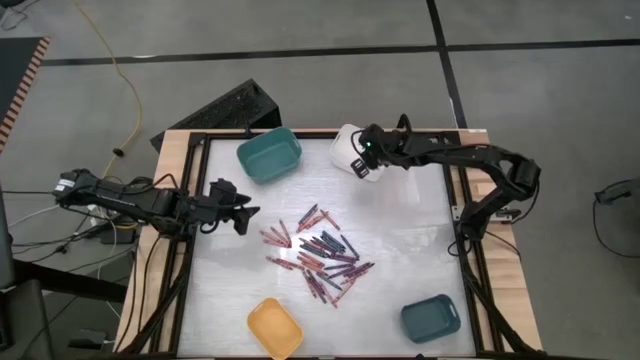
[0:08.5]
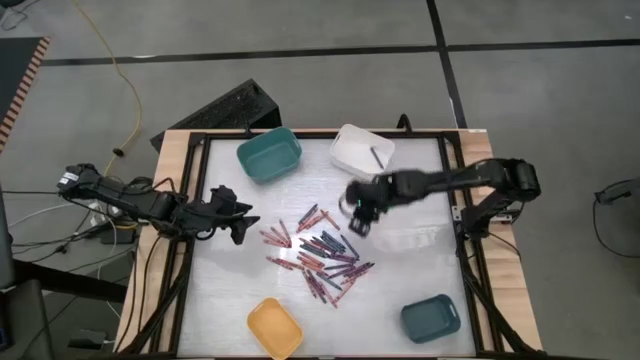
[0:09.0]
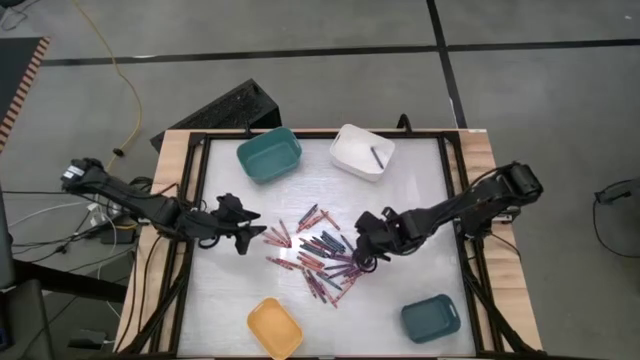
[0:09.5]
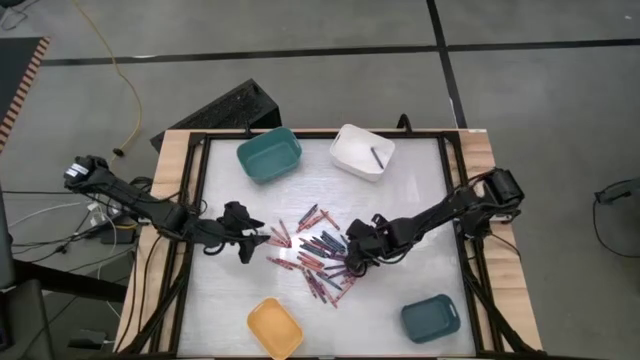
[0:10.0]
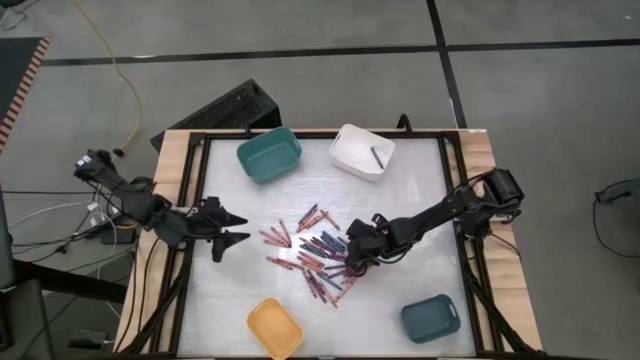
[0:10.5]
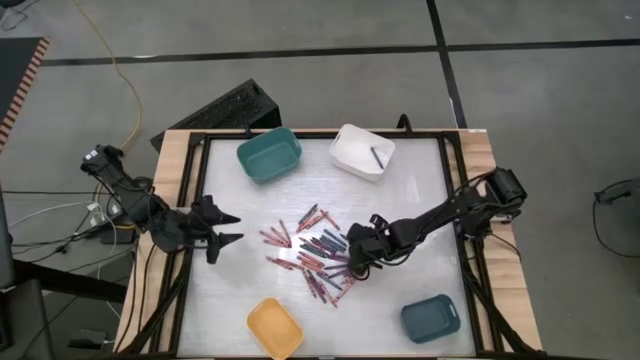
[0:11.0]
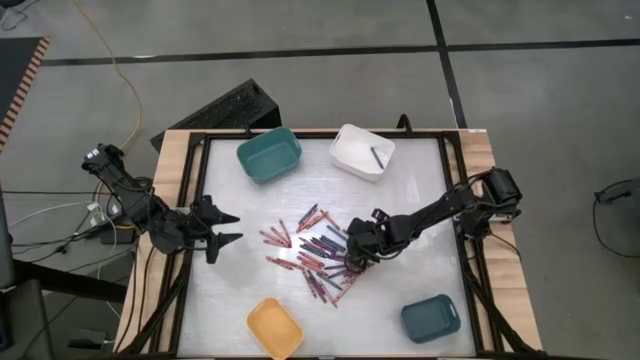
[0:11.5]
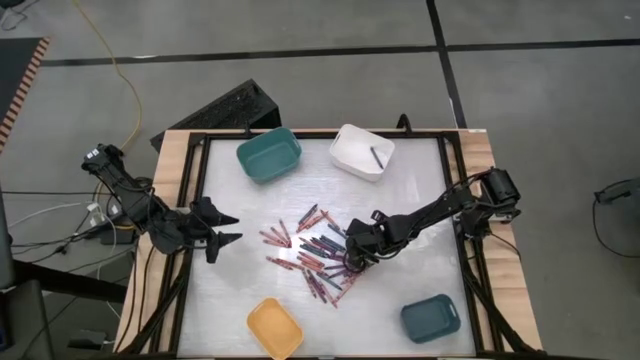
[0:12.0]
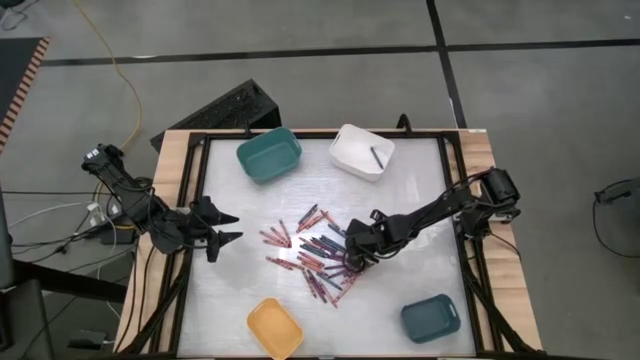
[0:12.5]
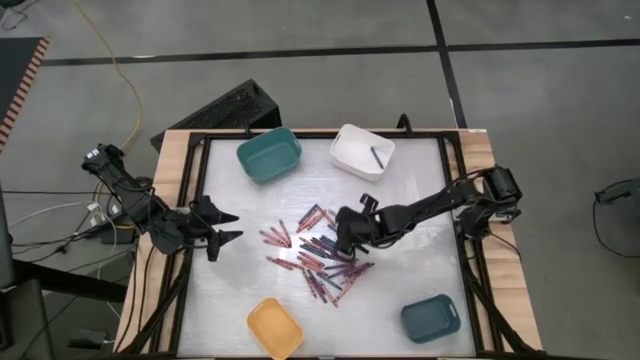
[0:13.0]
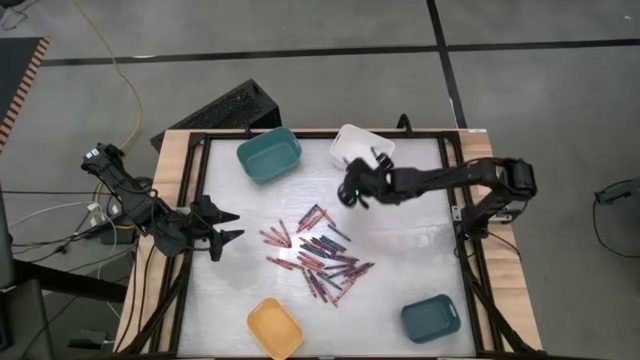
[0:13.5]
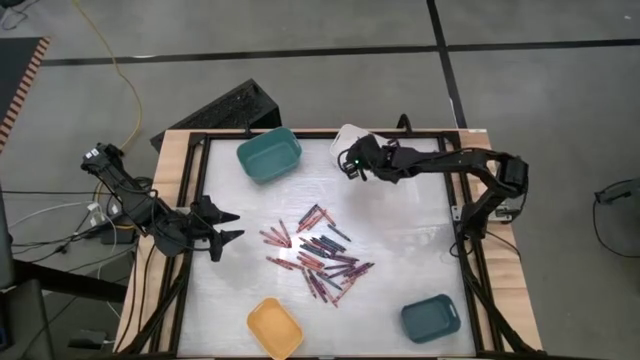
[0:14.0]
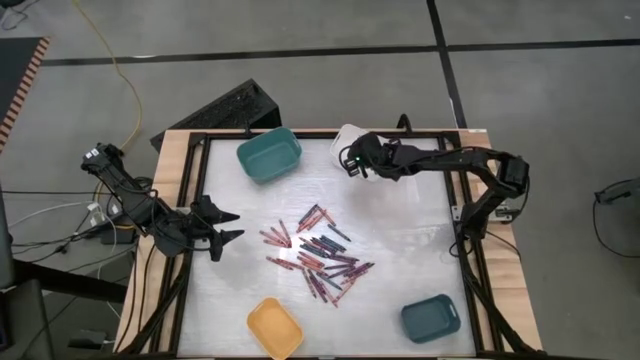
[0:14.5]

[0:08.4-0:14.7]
Task: Sort crayons
Put the blue crayon into the white bin

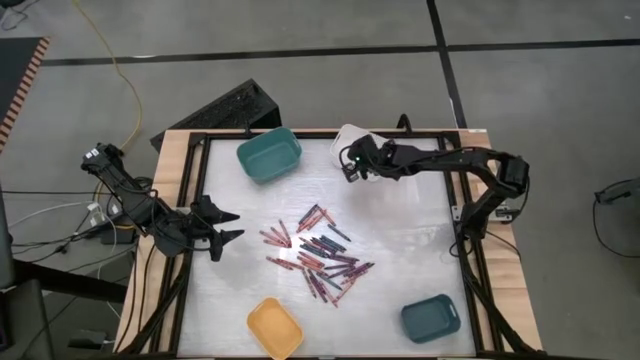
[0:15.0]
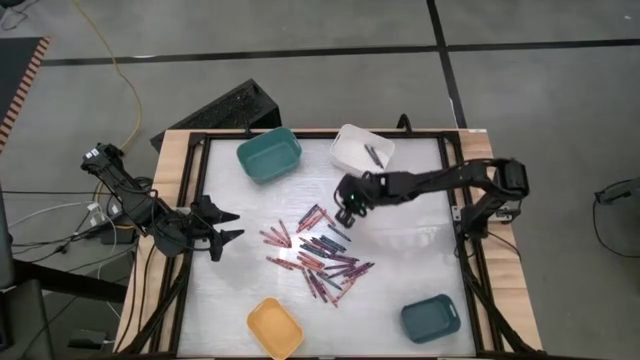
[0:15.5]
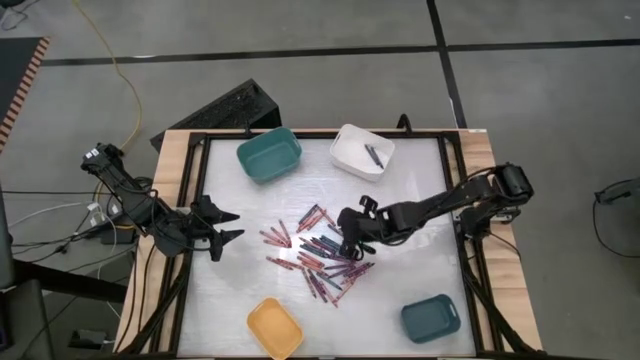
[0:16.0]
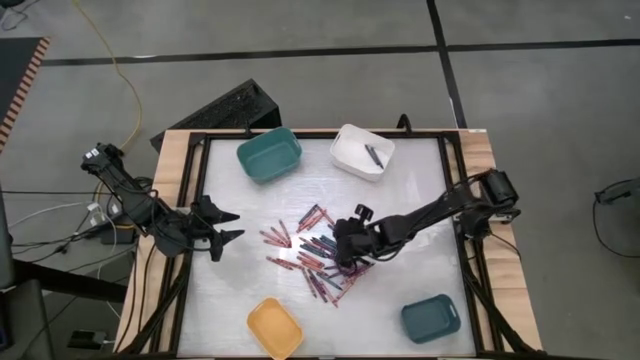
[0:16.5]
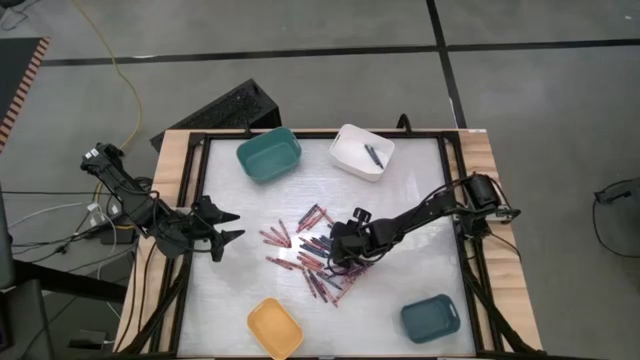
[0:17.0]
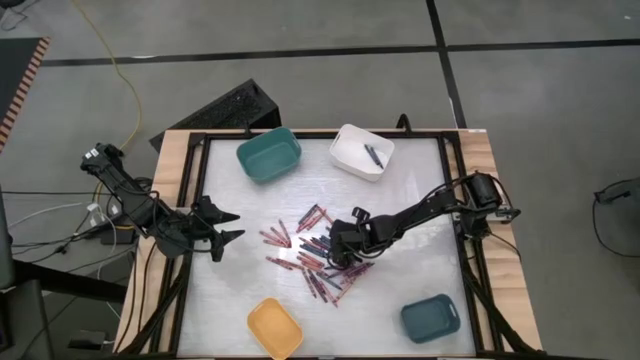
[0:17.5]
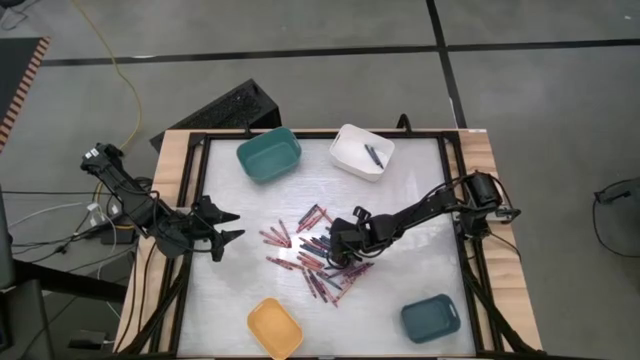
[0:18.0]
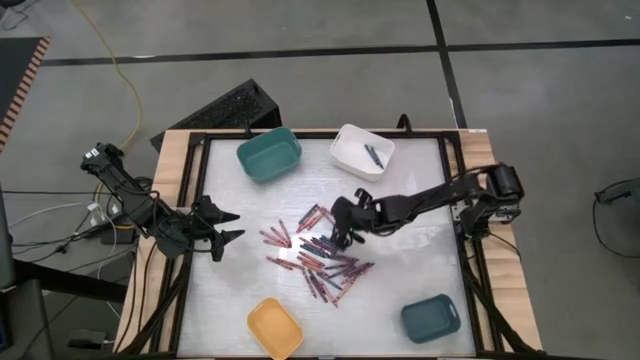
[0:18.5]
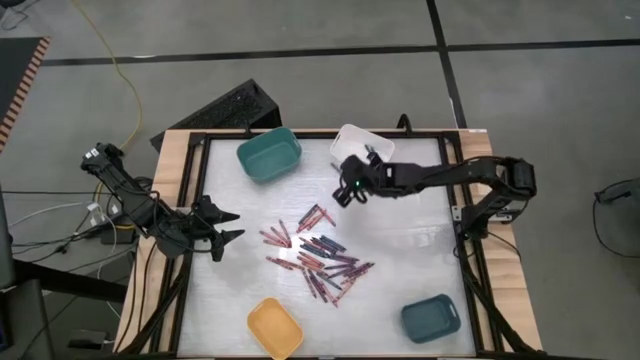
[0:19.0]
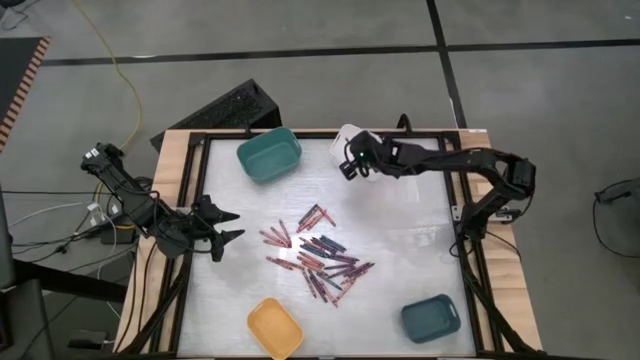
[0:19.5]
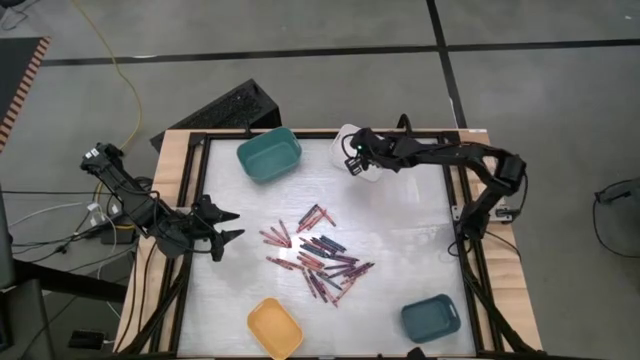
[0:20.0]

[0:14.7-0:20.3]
Put the blue crayon into the white bin

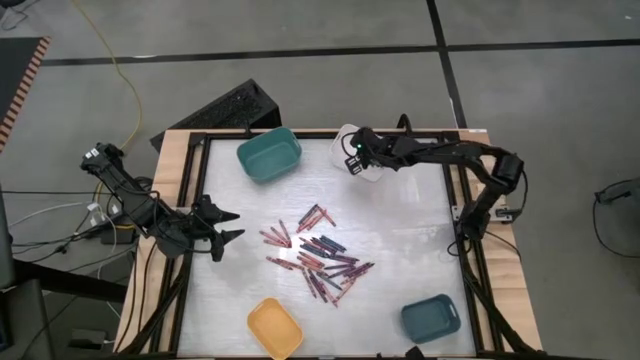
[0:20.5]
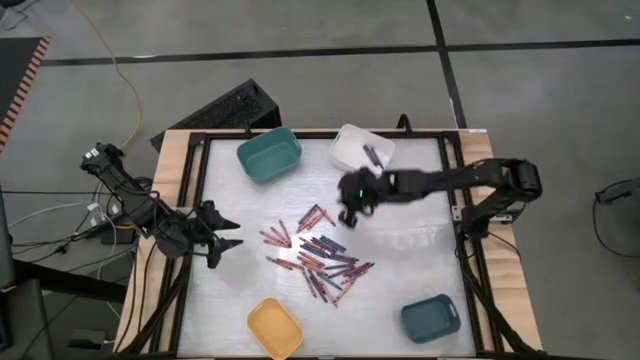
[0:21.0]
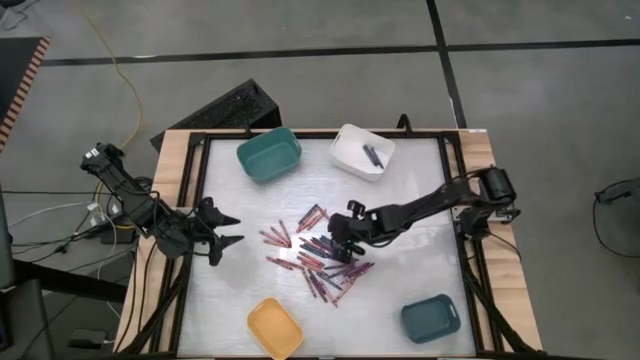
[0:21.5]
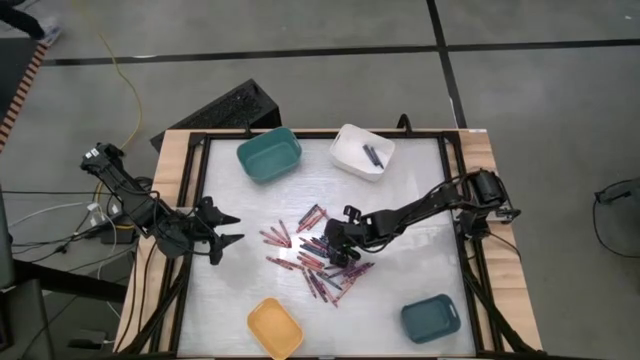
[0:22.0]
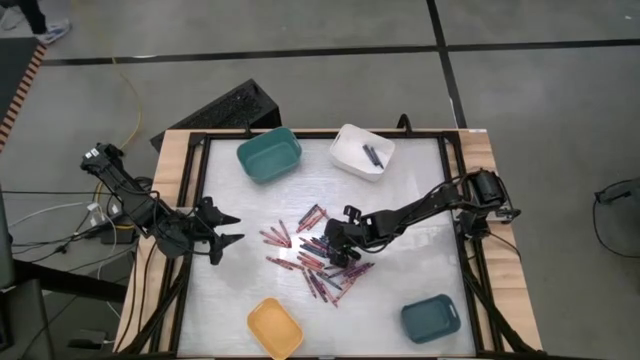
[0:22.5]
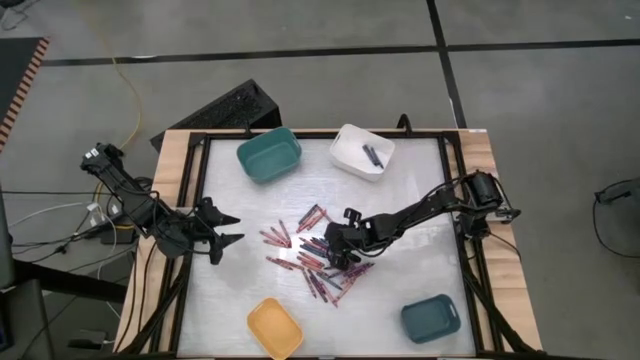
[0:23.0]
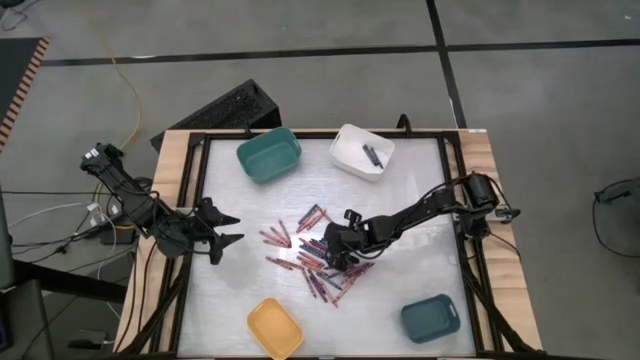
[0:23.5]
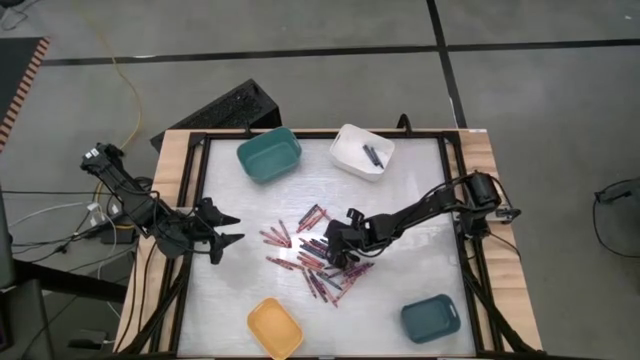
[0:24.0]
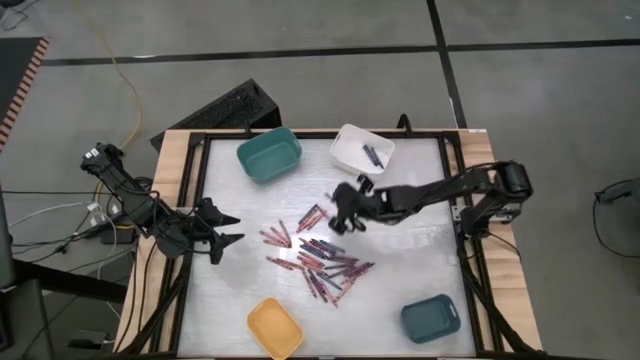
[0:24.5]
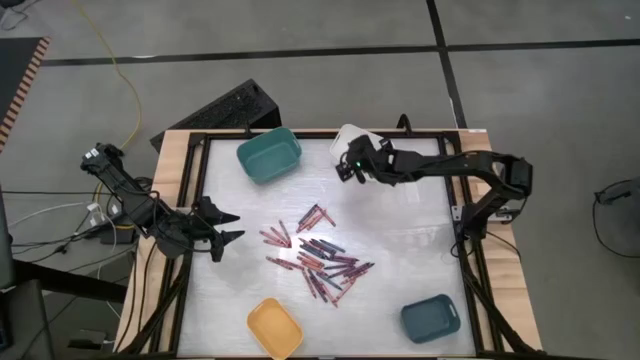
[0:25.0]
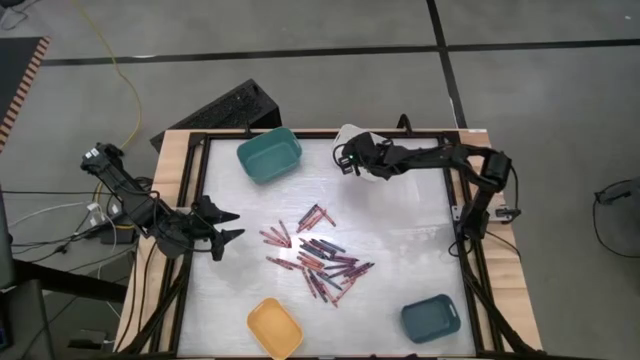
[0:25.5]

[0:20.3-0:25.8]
Put the blue crayon into the white bin

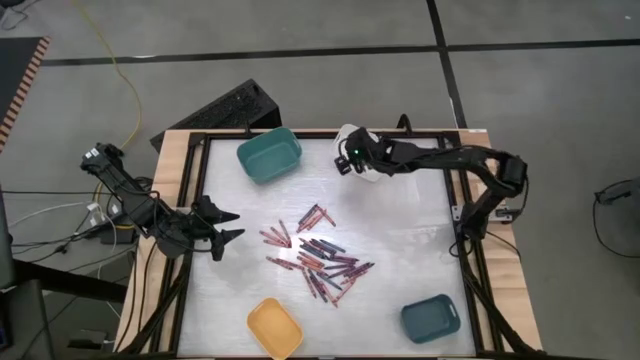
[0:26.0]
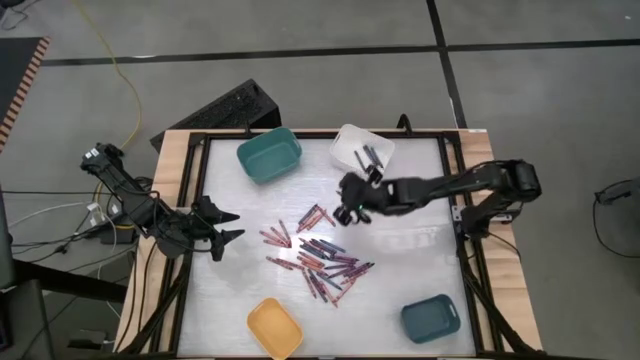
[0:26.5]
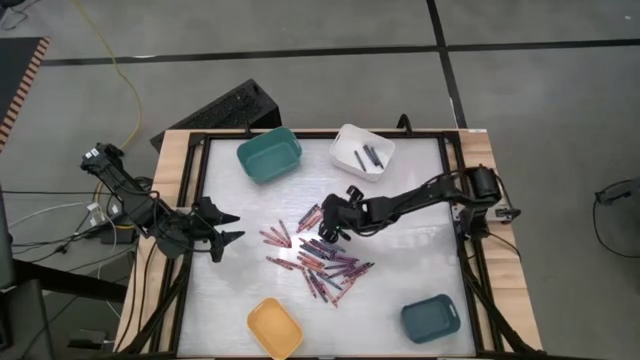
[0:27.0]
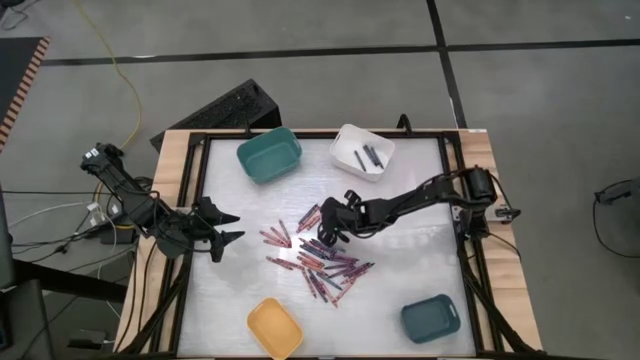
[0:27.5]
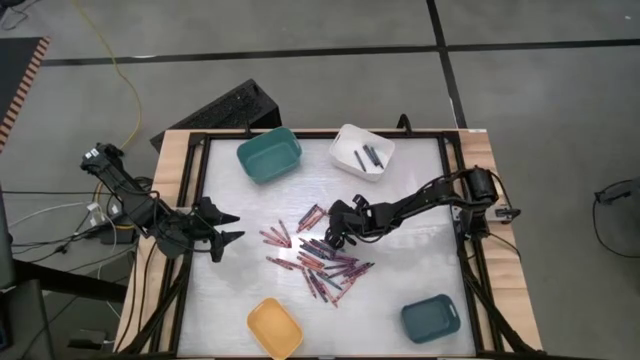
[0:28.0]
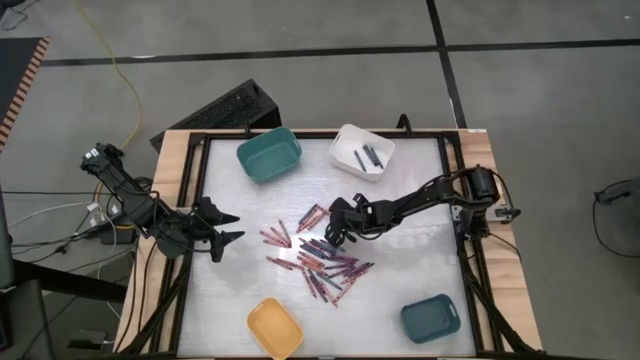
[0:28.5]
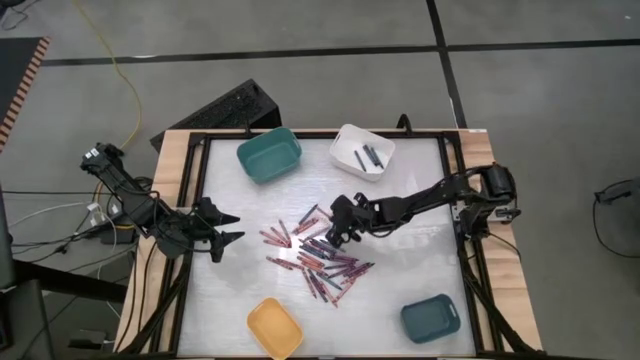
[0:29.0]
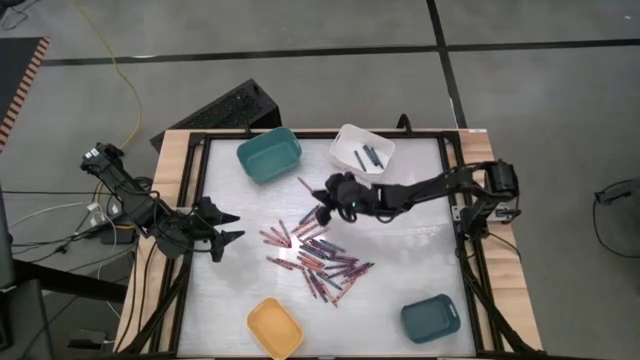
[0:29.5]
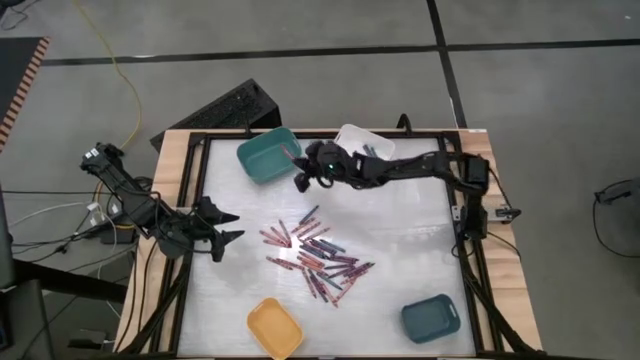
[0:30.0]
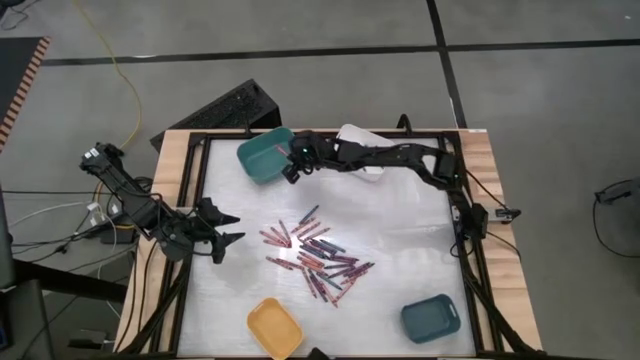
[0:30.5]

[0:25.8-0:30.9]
Put the red crayon into the top green bin
